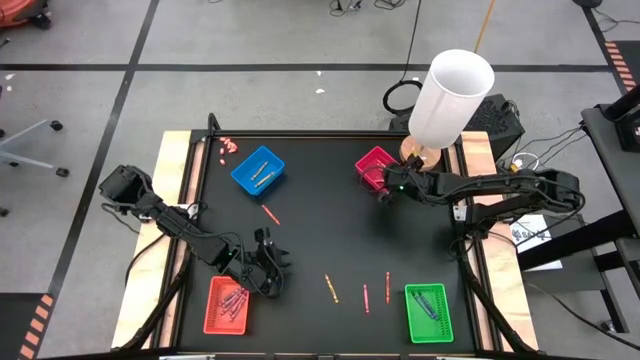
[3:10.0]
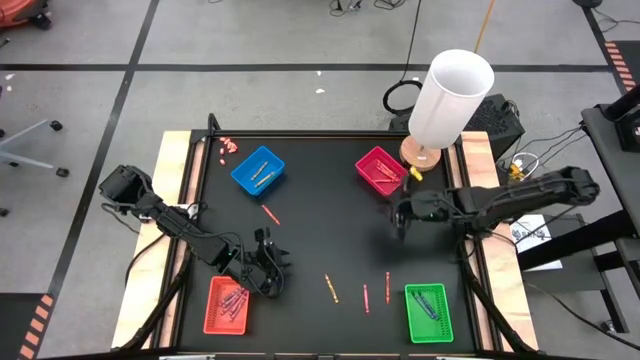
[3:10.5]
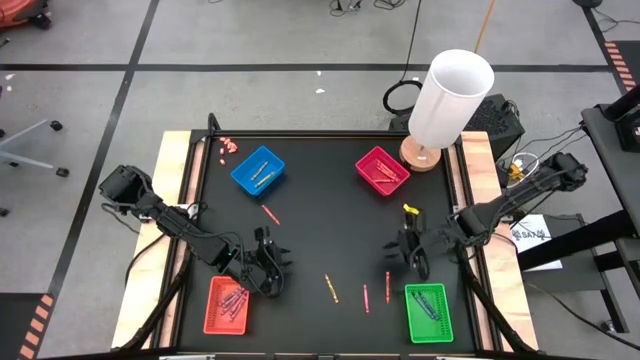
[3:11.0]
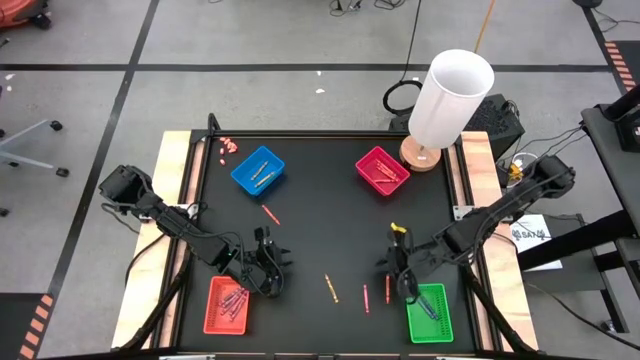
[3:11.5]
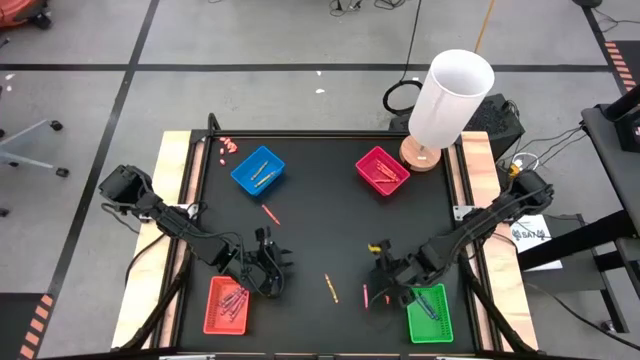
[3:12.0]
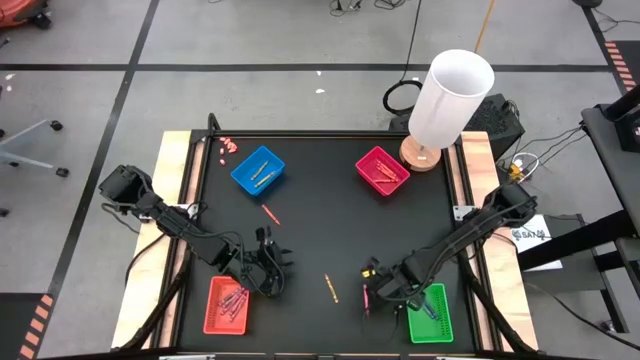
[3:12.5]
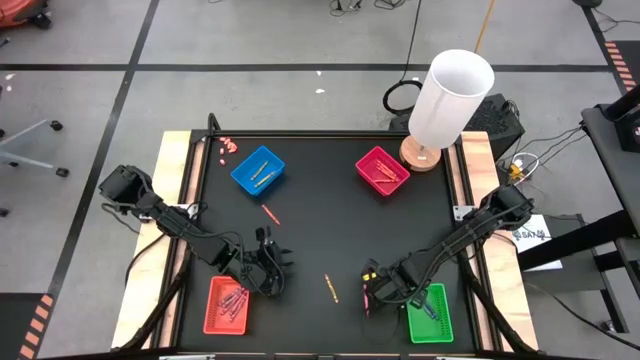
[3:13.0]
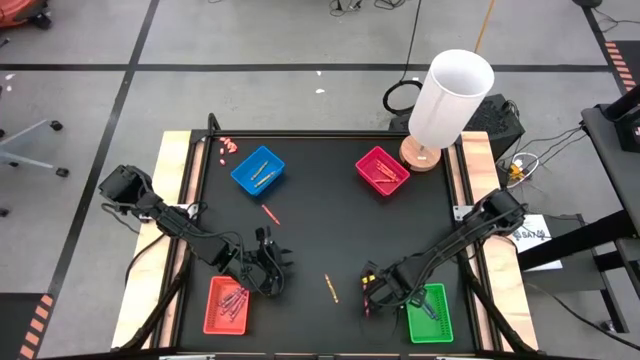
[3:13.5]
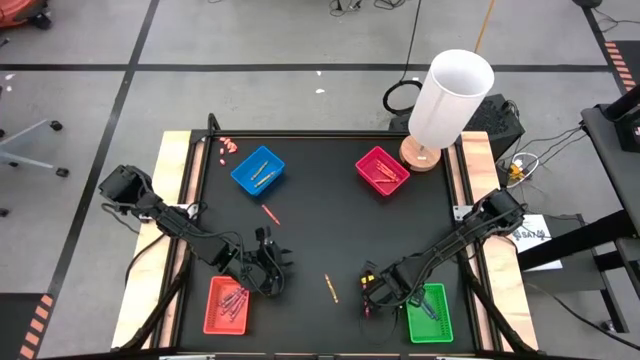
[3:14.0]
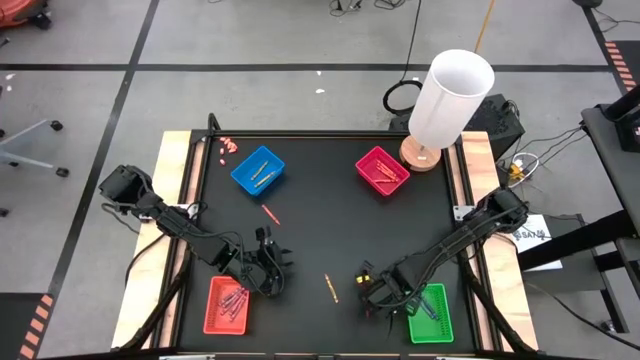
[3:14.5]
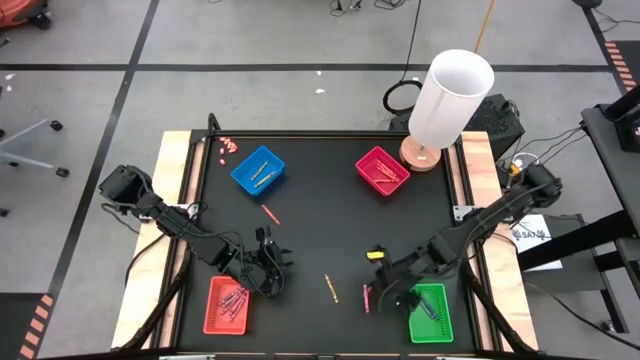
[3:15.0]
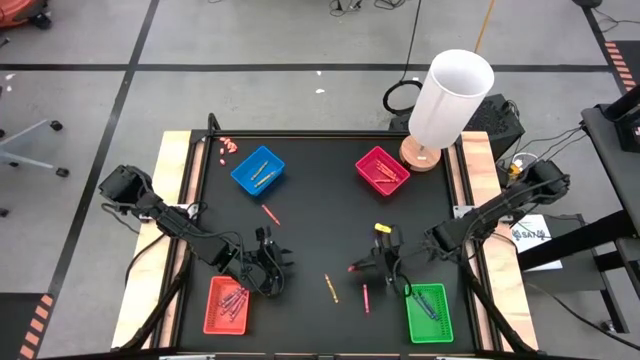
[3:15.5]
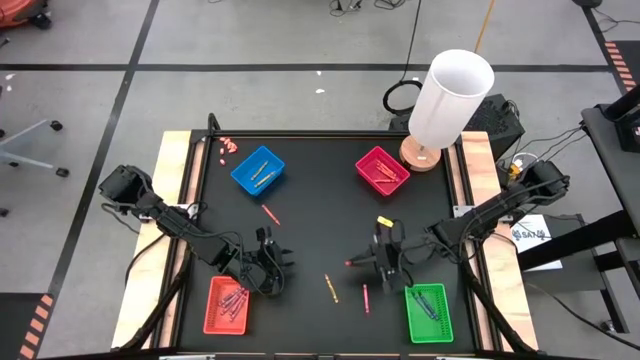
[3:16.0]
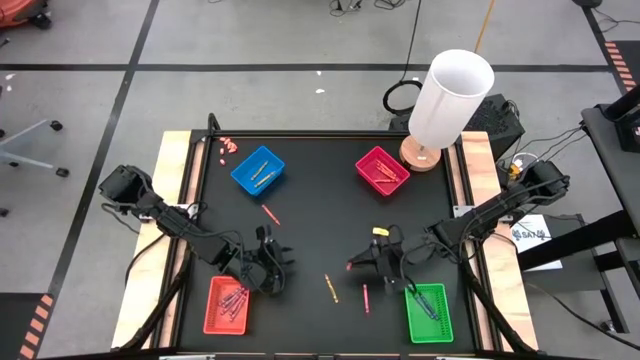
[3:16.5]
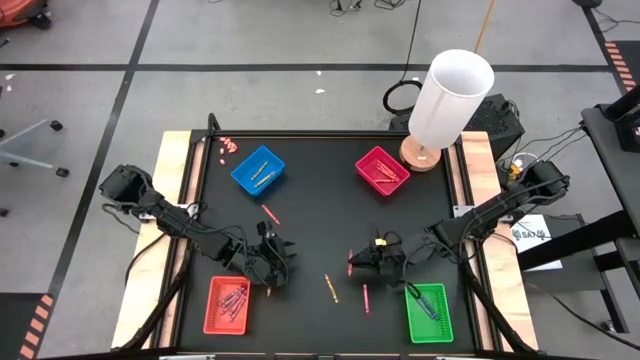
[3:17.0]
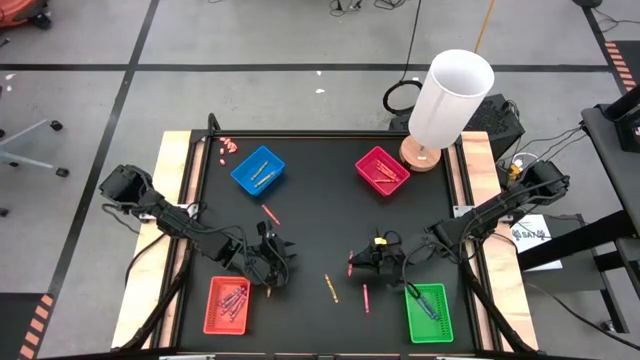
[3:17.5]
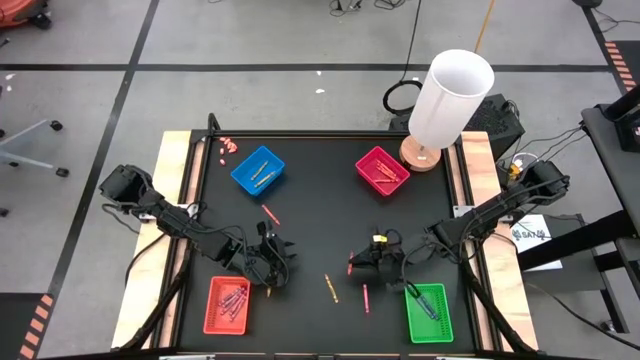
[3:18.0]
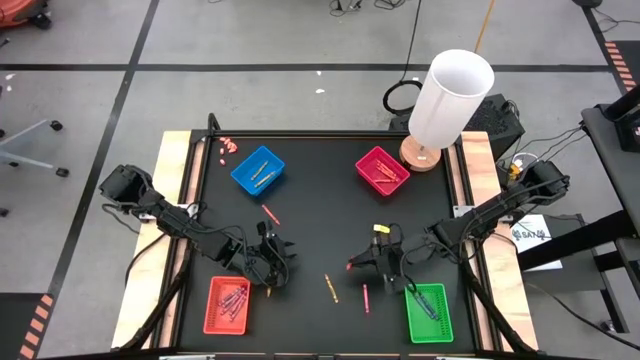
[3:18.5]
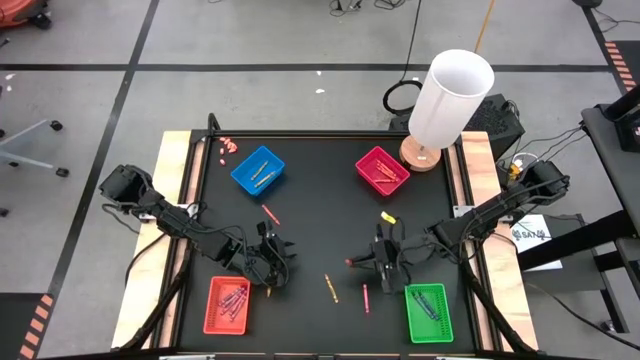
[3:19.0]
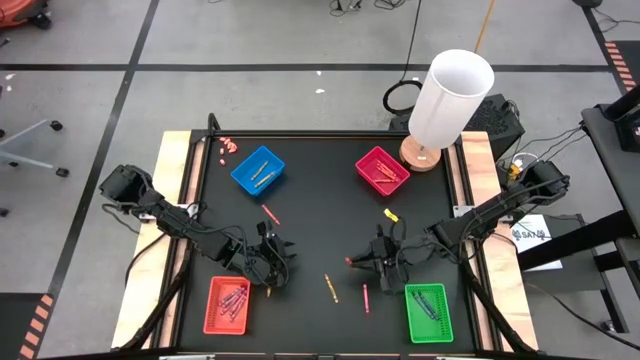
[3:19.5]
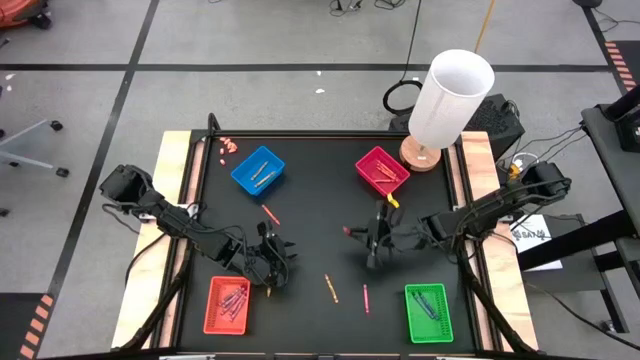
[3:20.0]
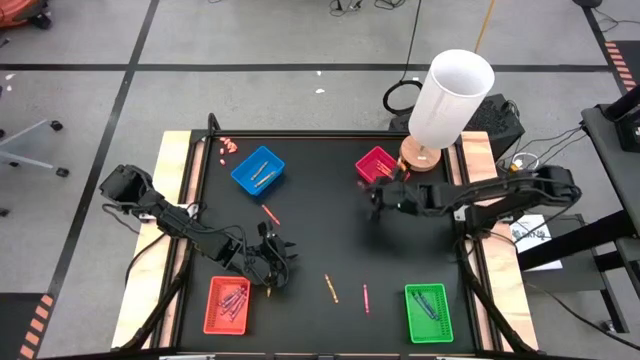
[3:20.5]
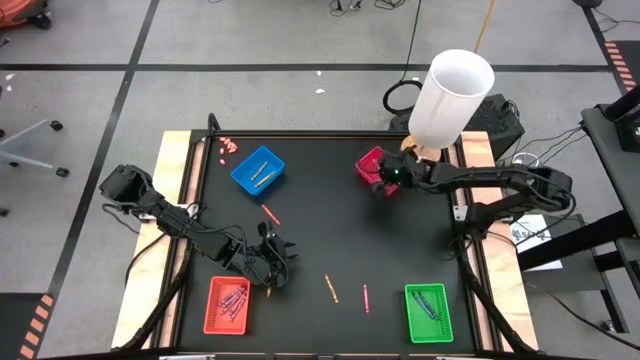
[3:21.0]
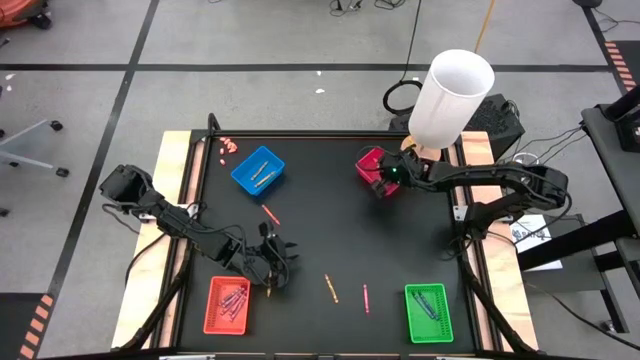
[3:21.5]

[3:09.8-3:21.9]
Task: Sort crayons
Put the orange crayon into the red bin

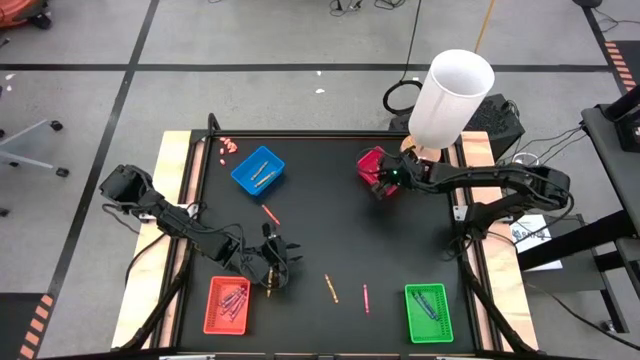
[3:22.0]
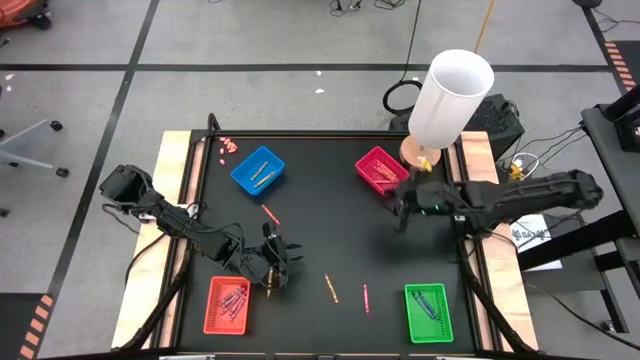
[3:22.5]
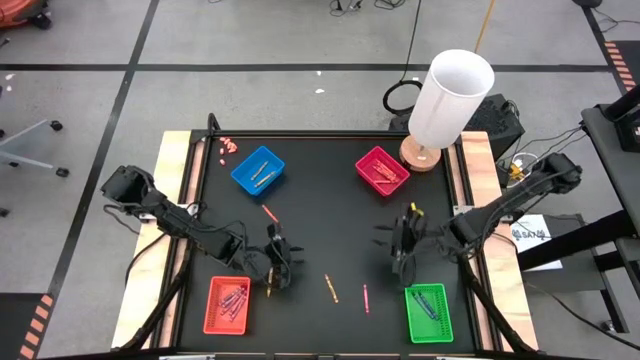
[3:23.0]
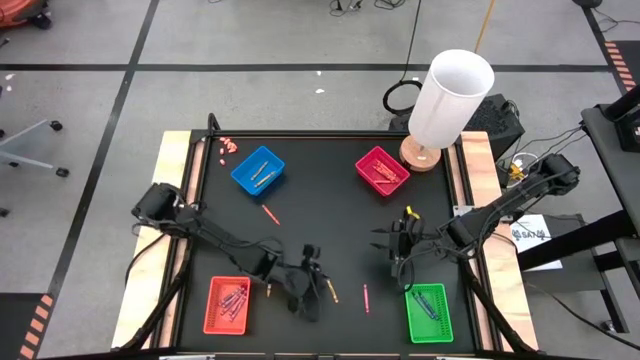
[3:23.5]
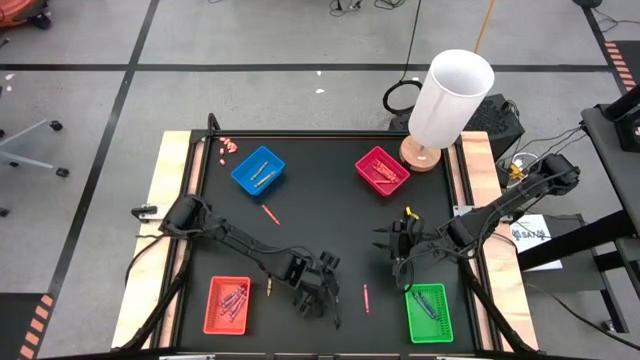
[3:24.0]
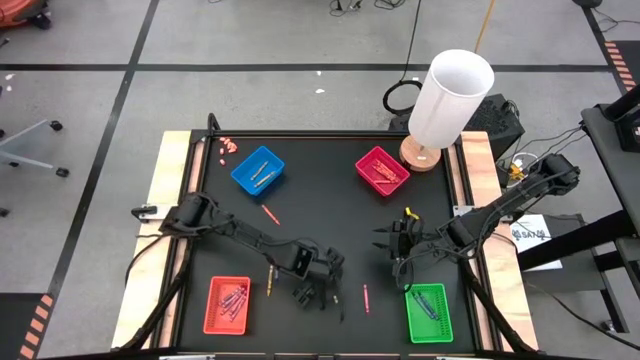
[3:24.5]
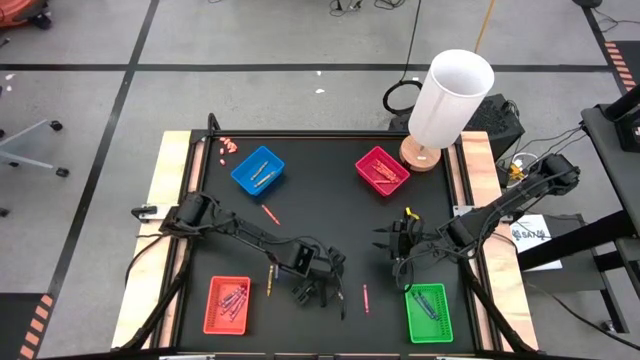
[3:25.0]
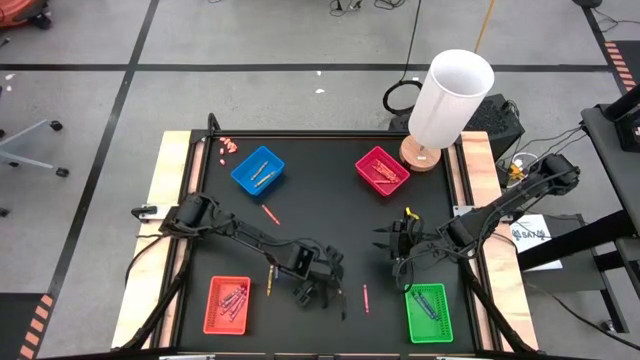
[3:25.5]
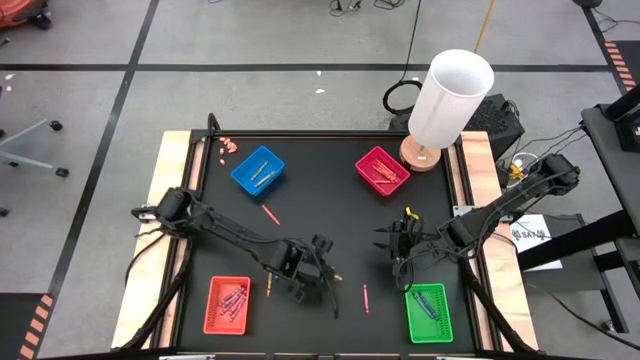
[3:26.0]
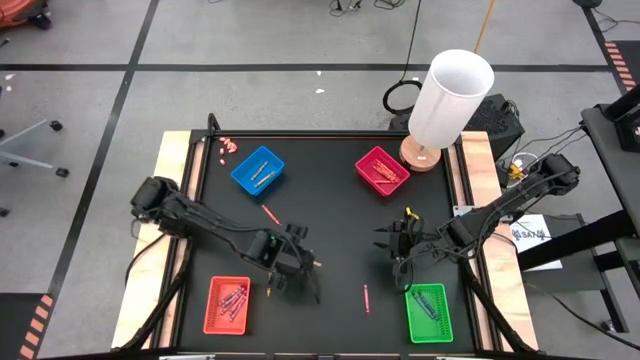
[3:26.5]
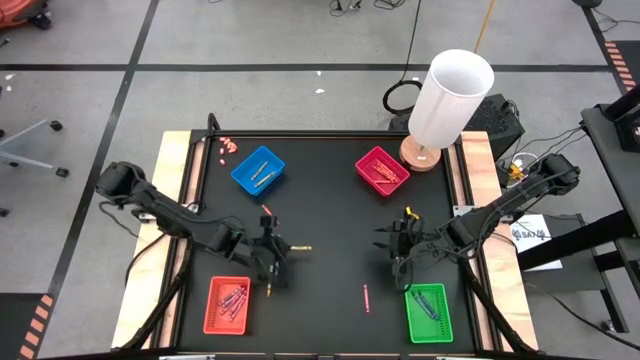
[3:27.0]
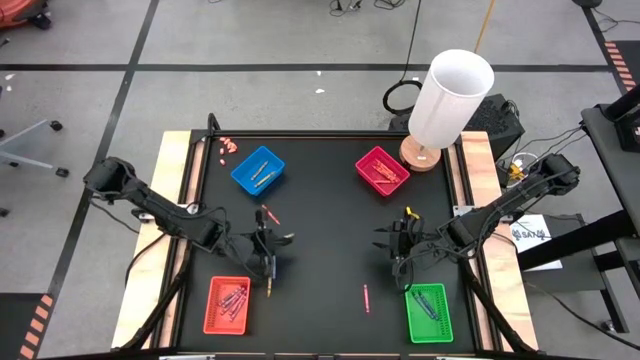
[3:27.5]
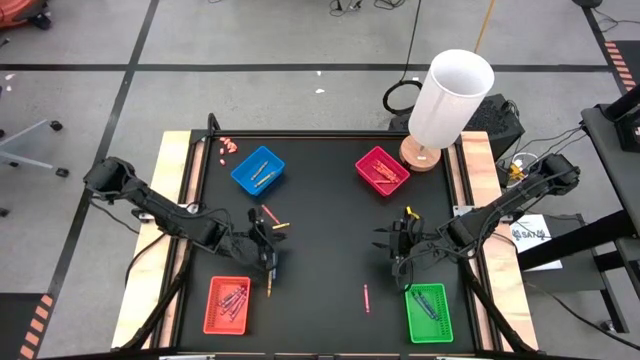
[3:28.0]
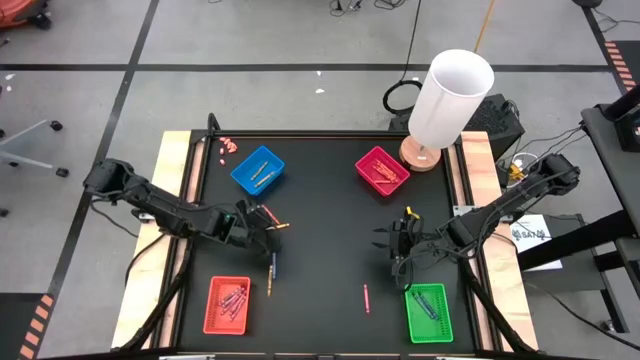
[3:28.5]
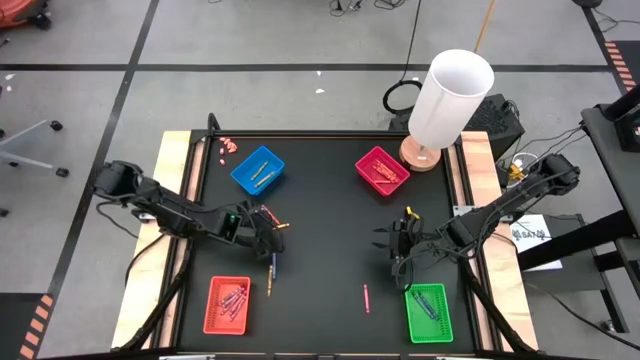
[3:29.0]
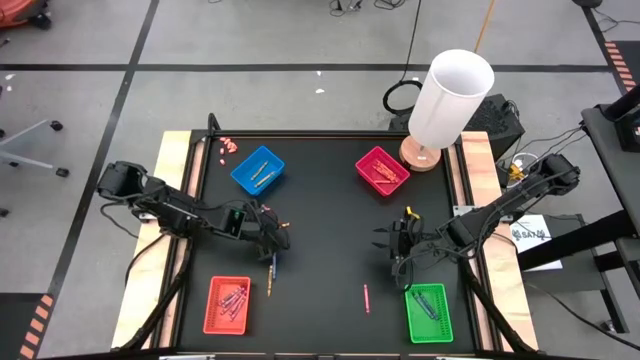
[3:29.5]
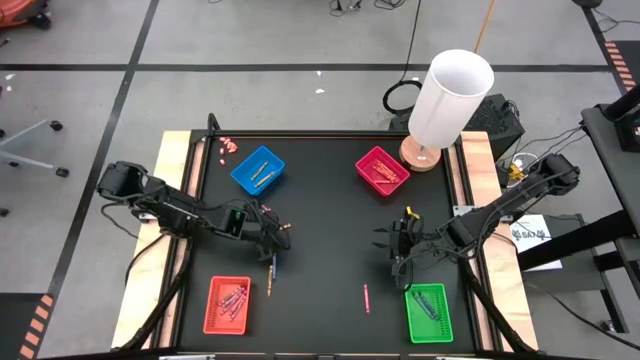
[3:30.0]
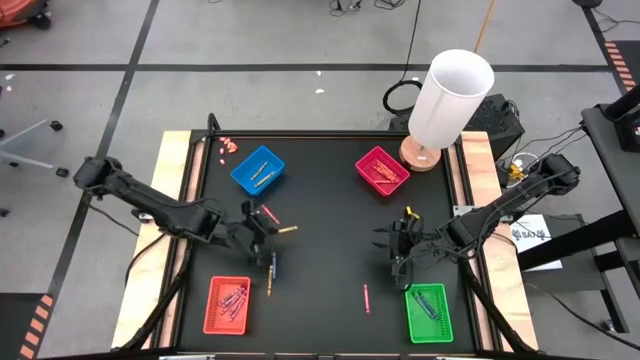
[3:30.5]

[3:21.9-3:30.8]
Put the yellow crayon into the blue bin
